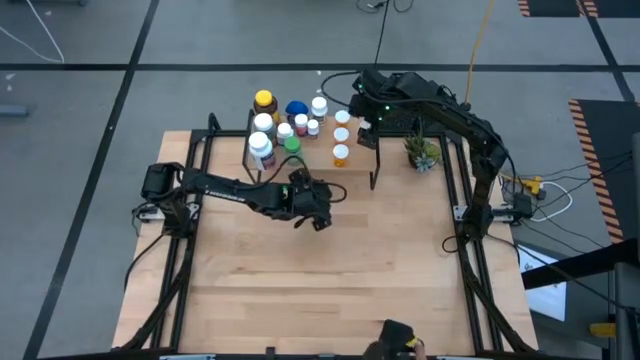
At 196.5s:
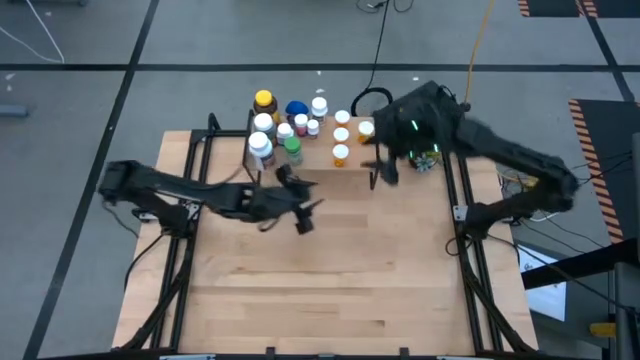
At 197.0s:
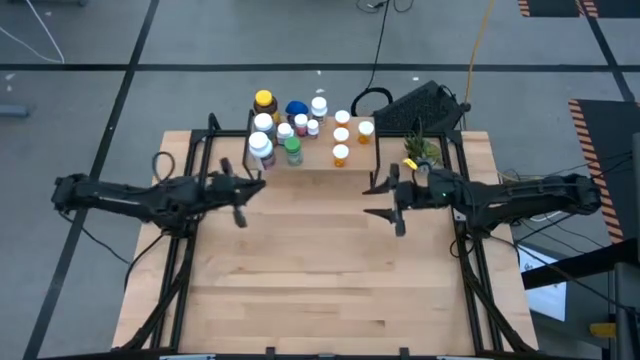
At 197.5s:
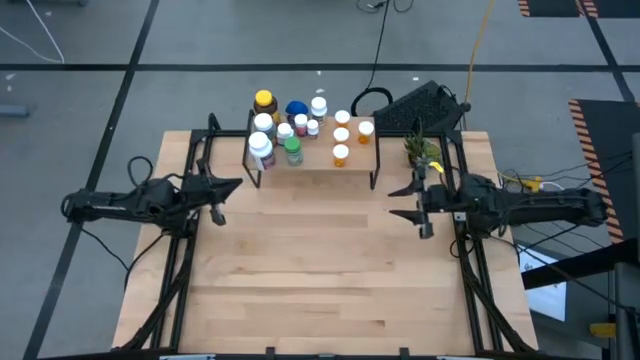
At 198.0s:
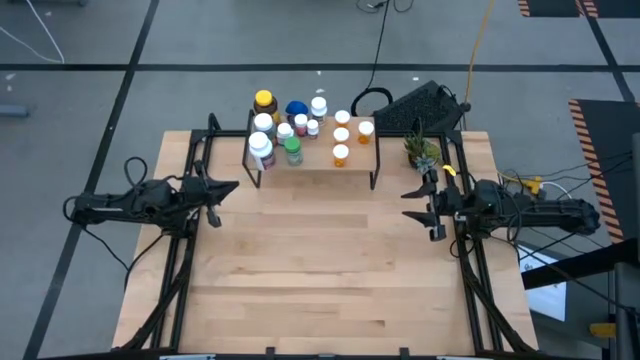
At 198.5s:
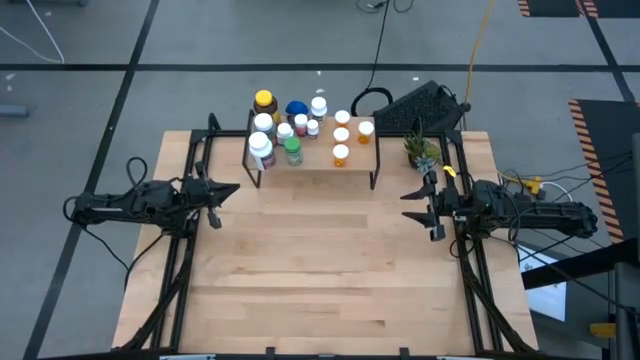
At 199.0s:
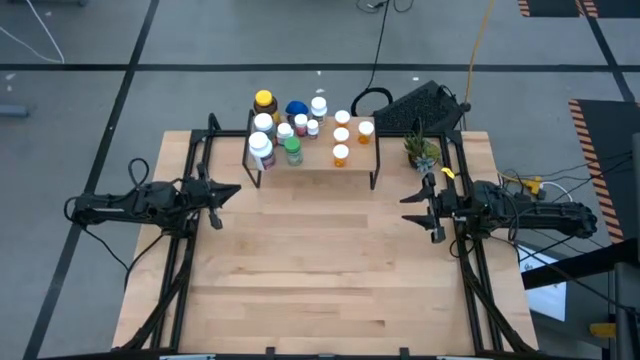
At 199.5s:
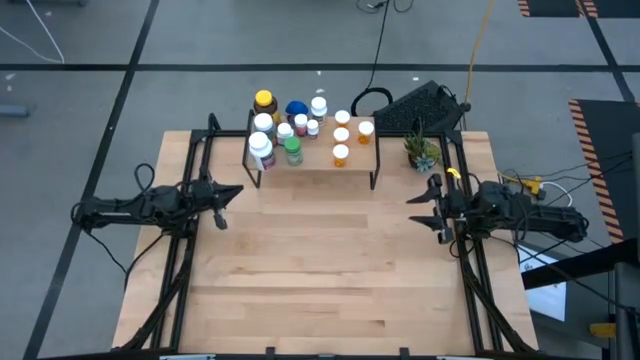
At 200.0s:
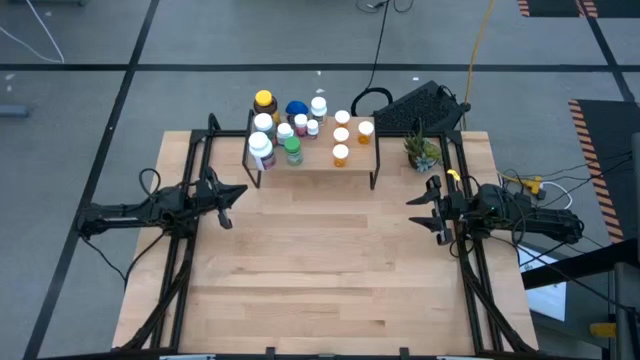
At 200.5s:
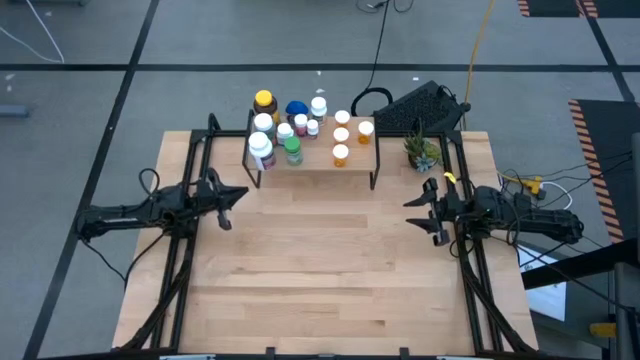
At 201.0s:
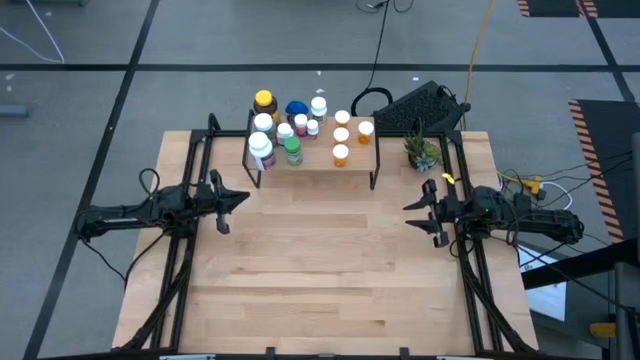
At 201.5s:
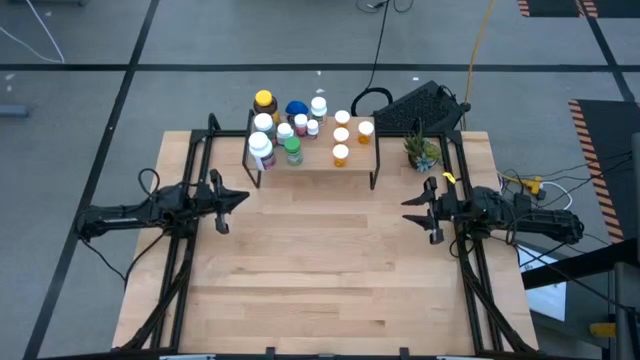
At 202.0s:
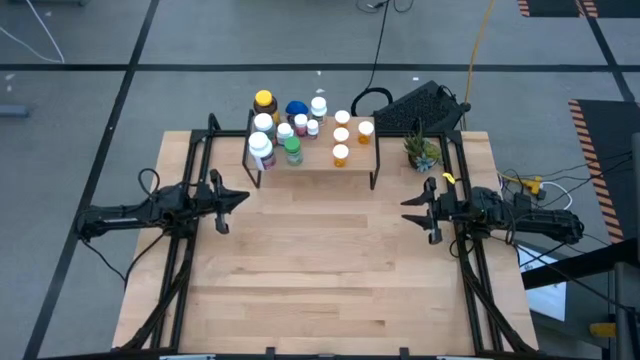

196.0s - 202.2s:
Task: Pick and place medicine bottles onto shelf by color
Return to Home Position

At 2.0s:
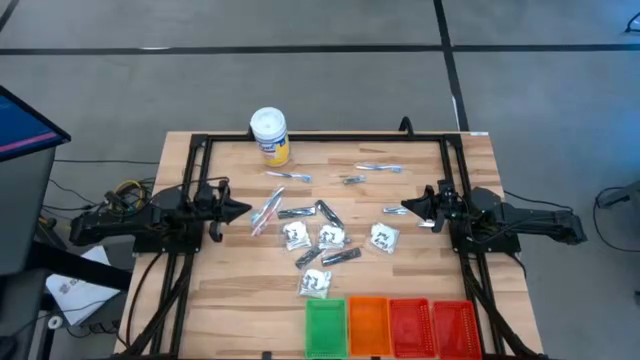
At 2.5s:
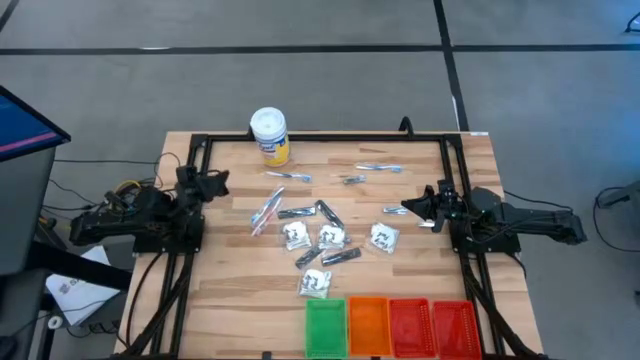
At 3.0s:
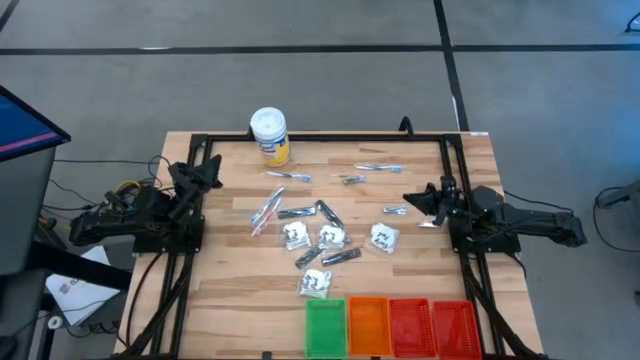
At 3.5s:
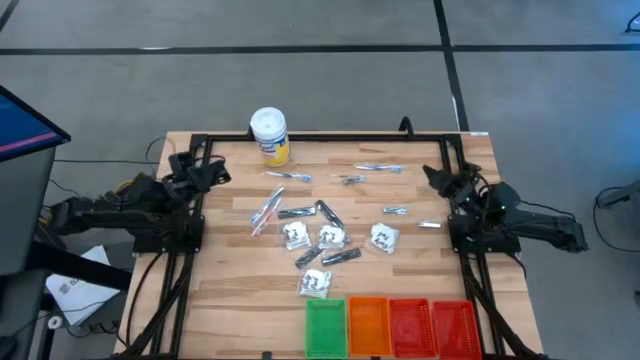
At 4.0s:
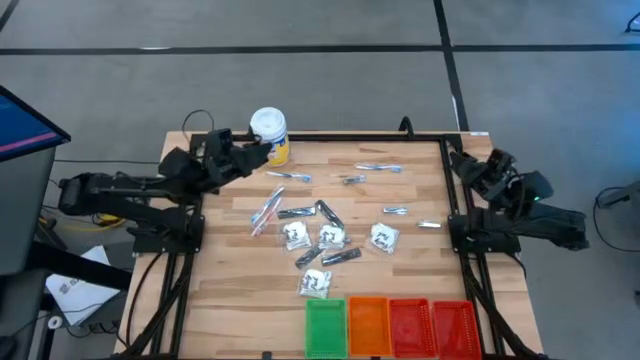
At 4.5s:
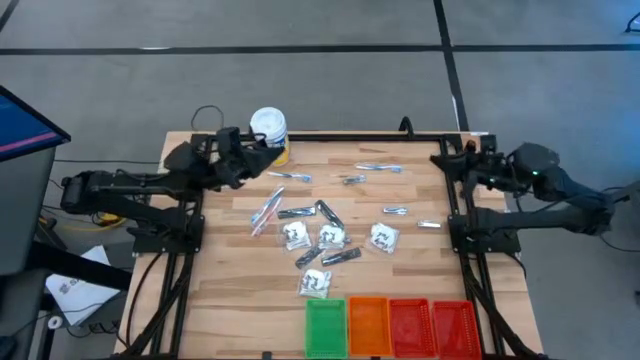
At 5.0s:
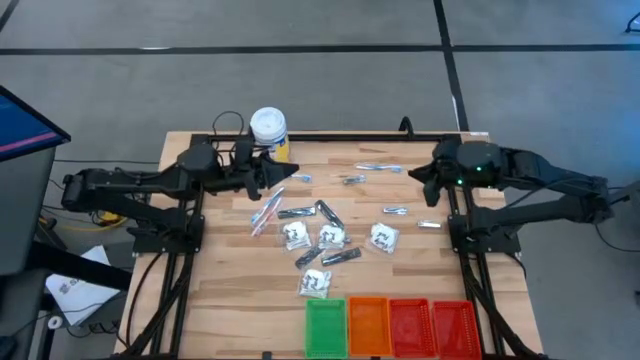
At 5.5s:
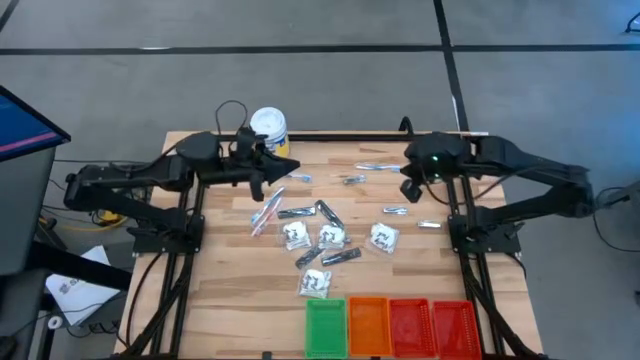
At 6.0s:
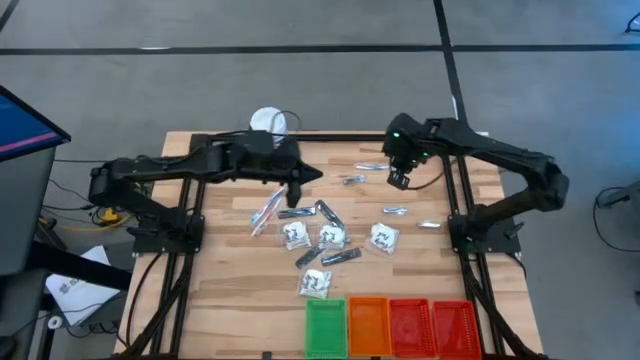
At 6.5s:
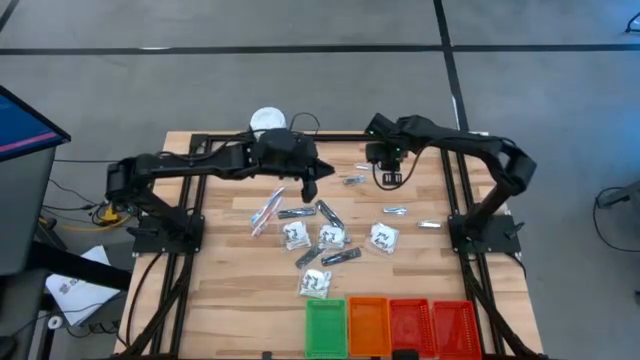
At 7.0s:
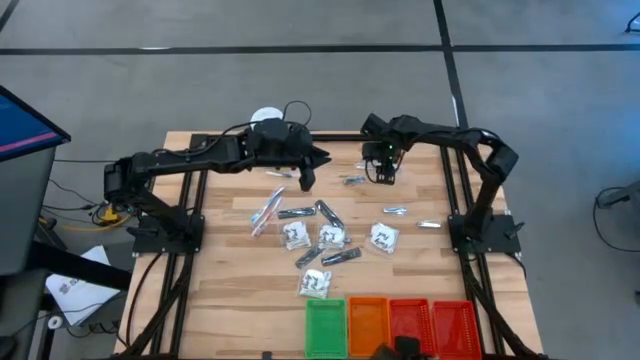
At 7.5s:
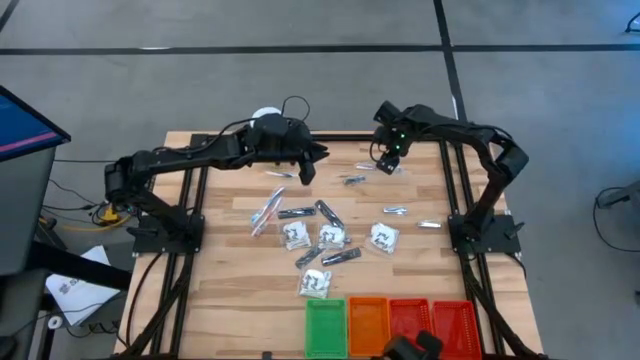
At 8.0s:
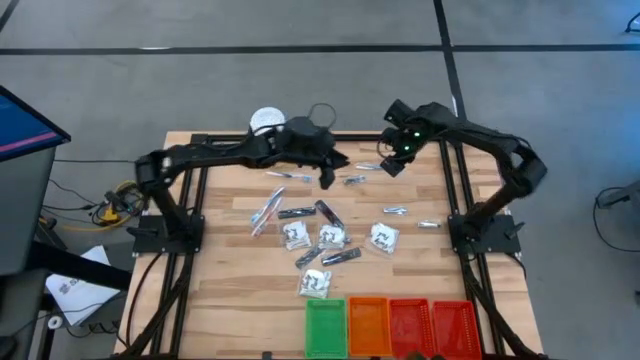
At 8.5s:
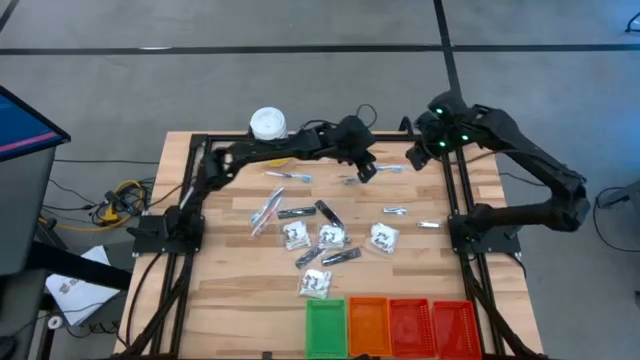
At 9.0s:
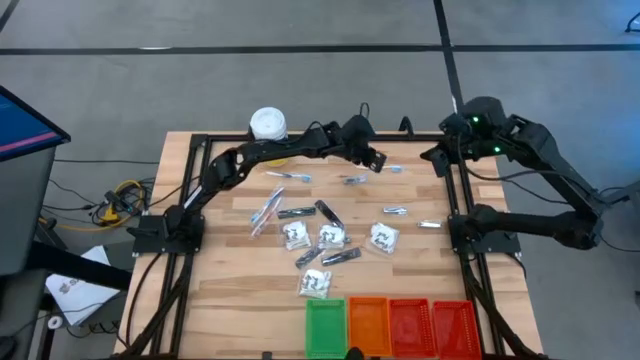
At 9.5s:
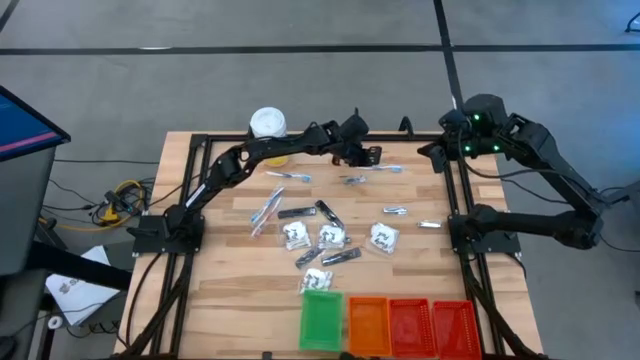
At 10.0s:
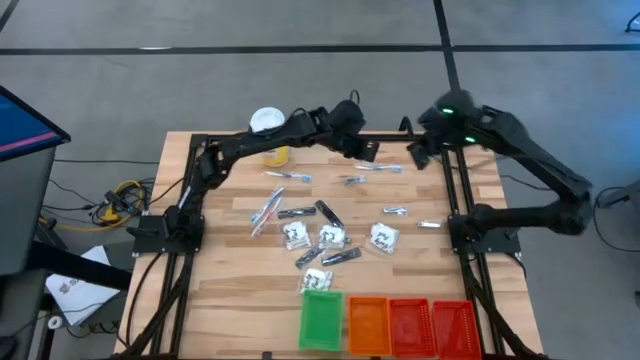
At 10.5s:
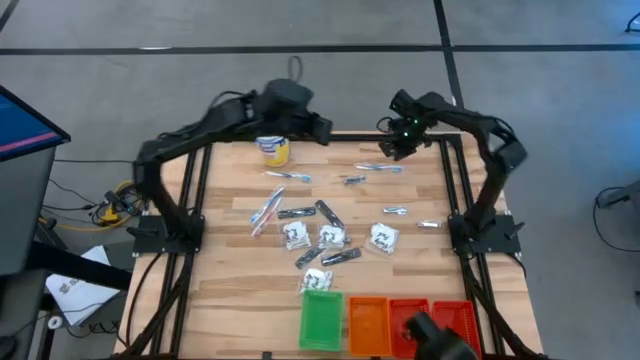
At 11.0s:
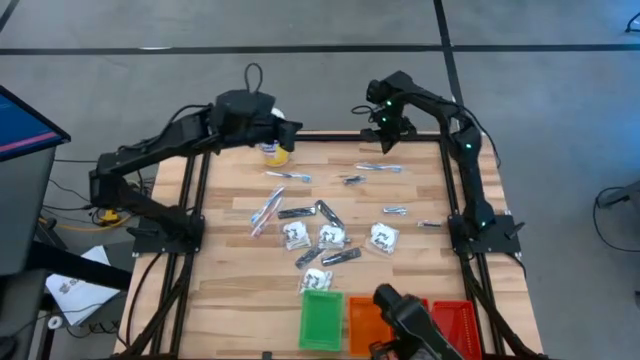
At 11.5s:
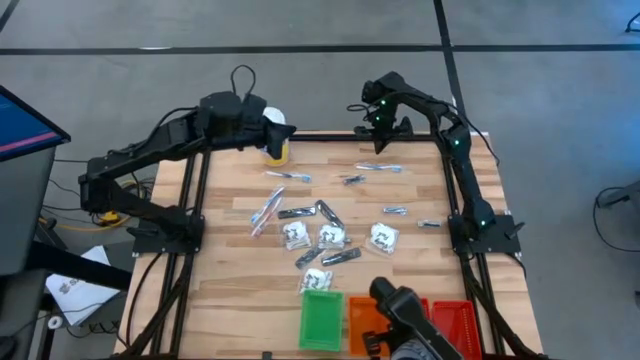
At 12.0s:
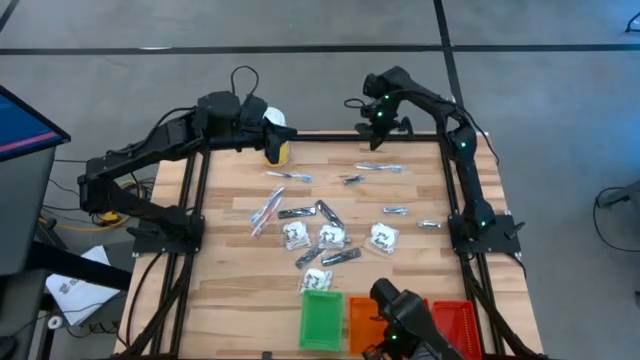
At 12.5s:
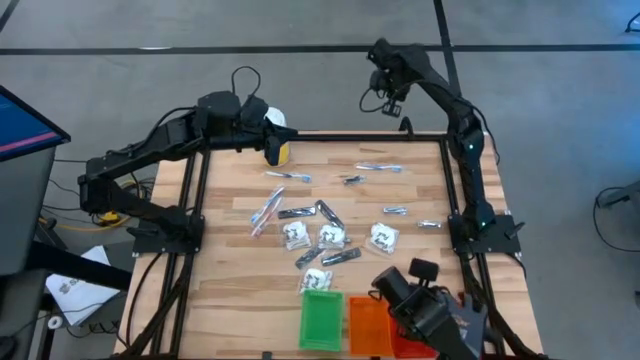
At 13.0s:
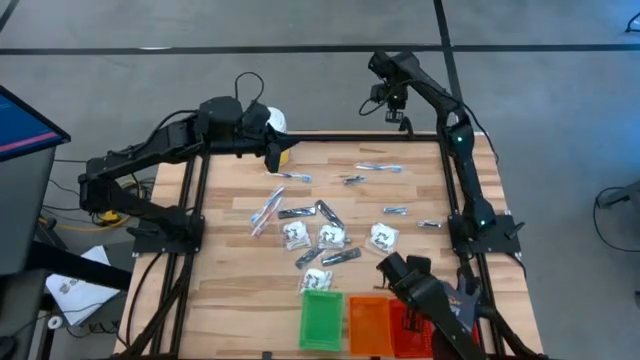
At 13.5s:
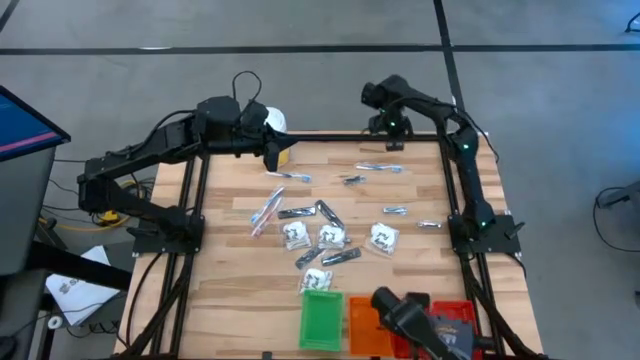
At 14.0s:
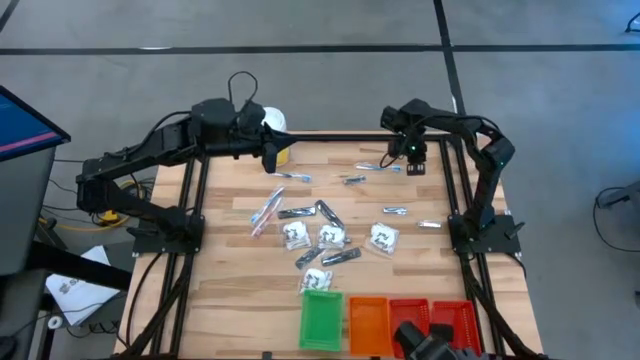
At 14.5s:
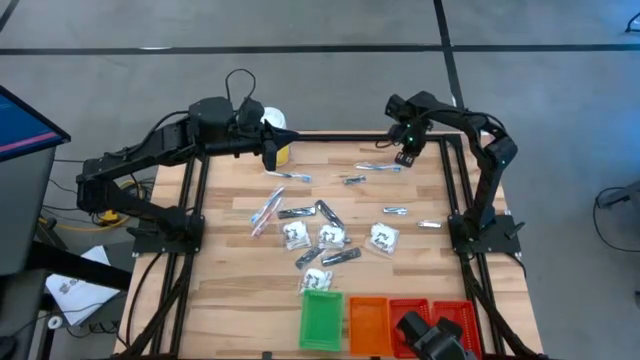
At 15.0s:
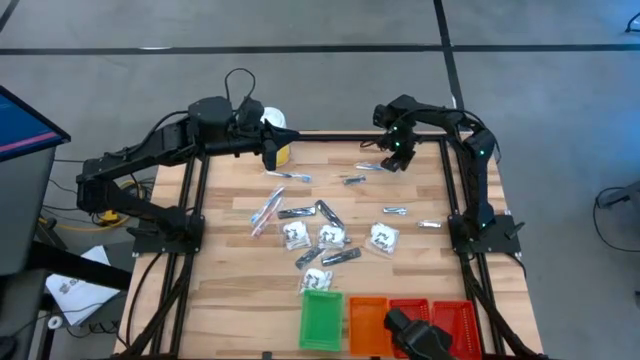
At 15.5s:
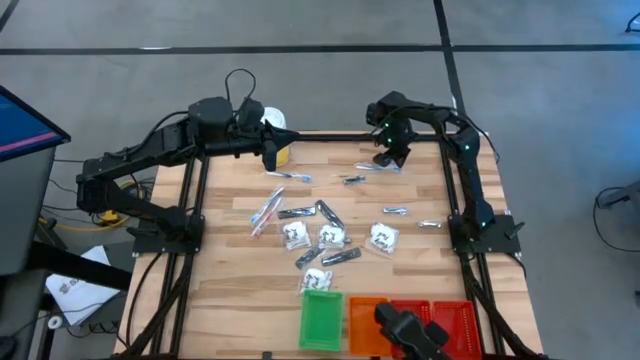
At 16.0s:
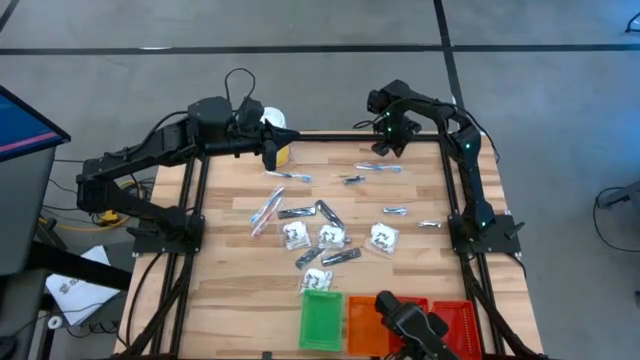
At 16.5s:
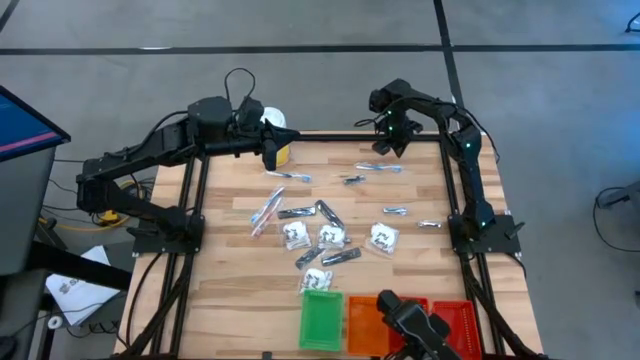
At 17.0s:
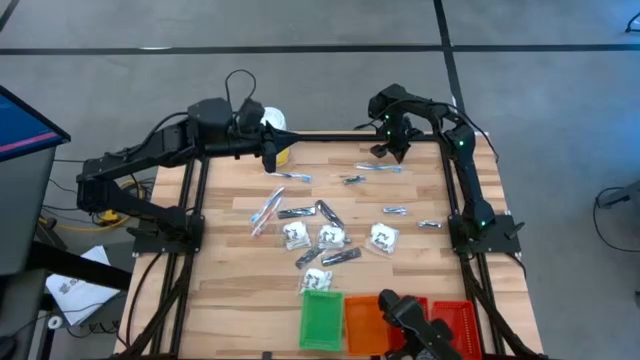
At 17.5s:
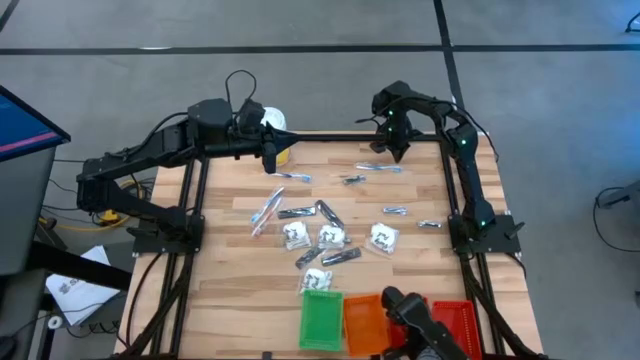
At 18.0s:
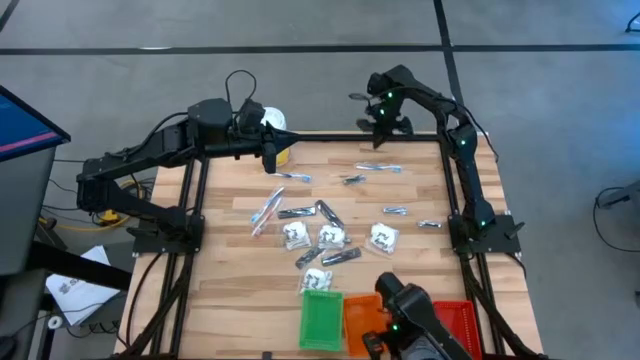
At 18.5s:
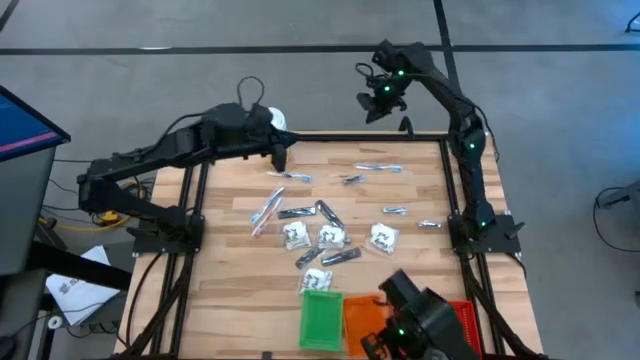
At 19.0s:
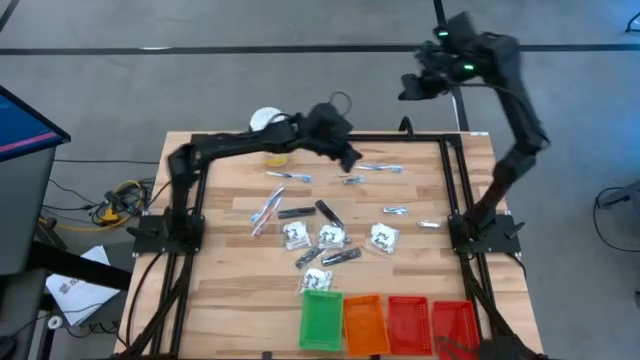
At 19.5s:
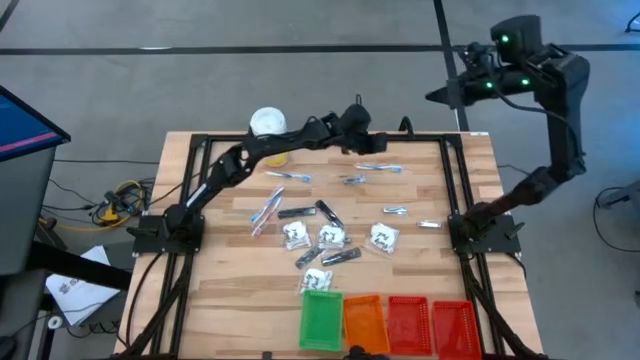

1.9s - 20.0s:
Task: Pick & Place Travel size toiletries
Put the blue toothbrush into the green basket
